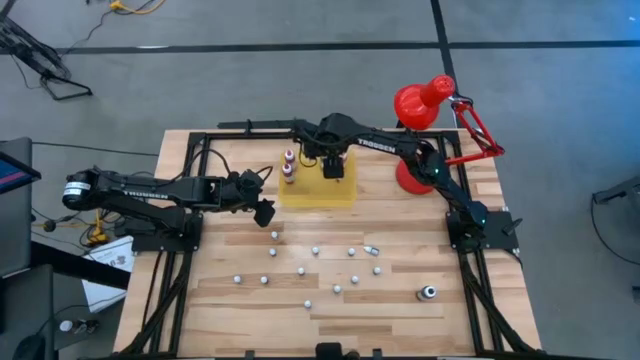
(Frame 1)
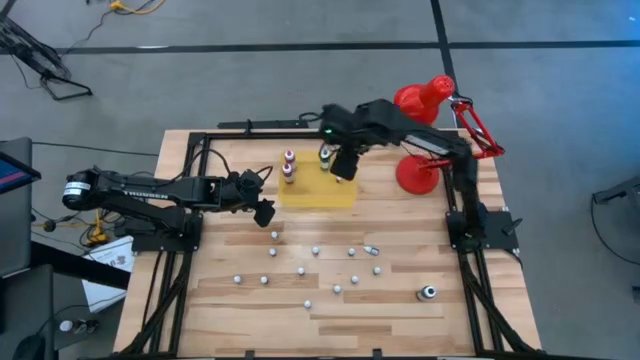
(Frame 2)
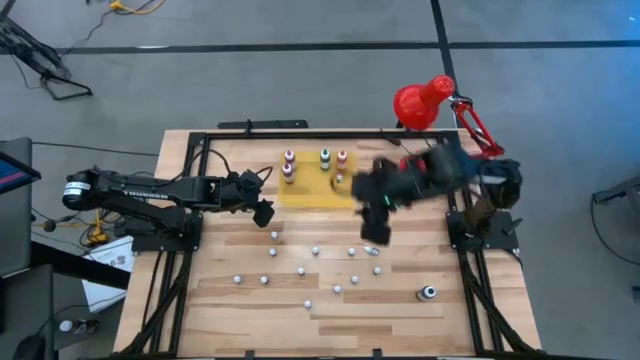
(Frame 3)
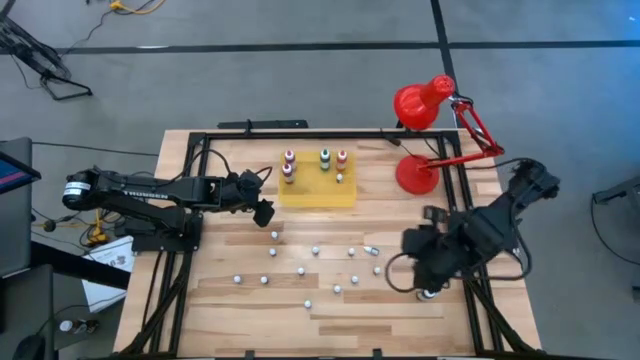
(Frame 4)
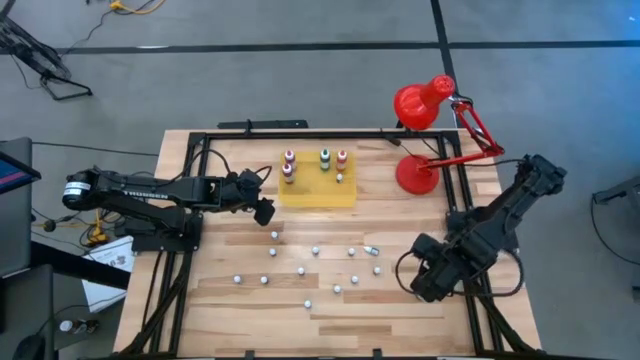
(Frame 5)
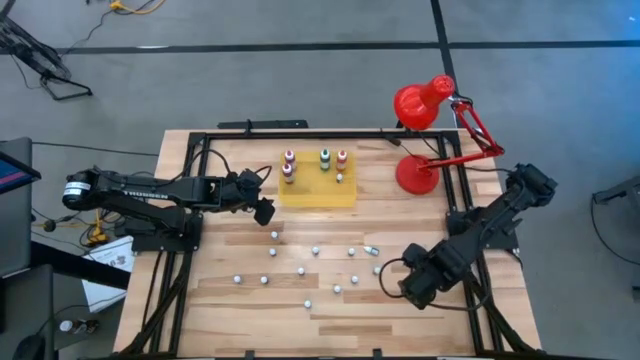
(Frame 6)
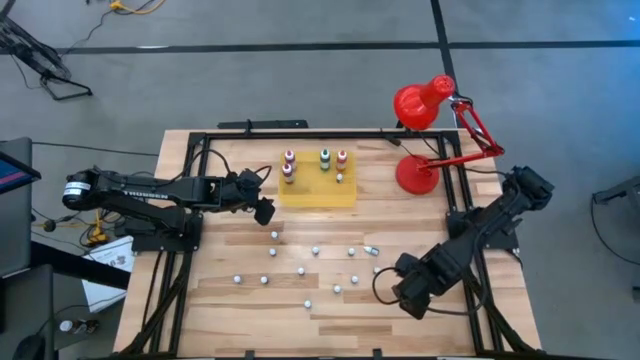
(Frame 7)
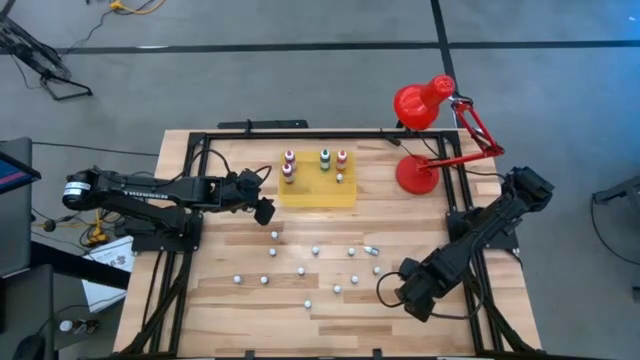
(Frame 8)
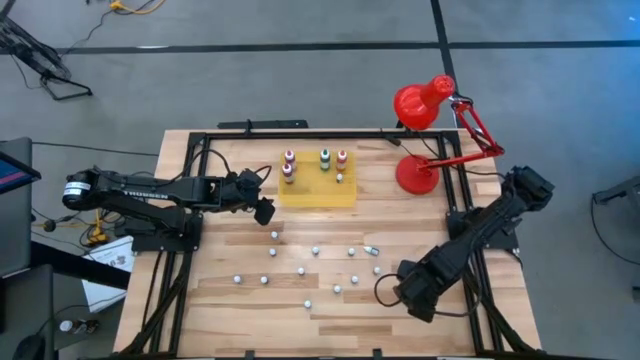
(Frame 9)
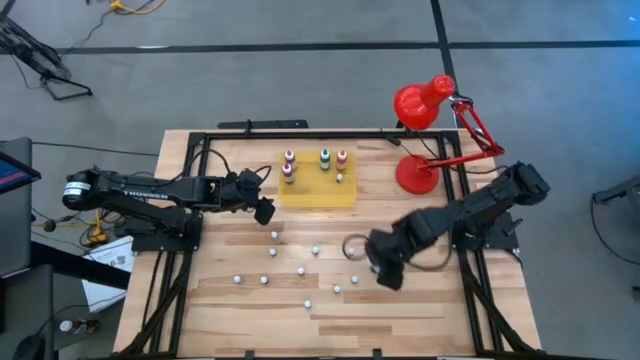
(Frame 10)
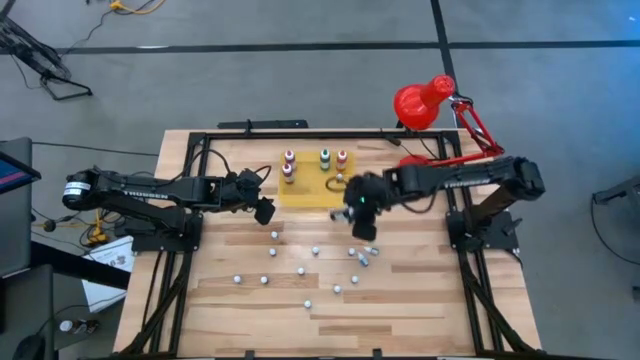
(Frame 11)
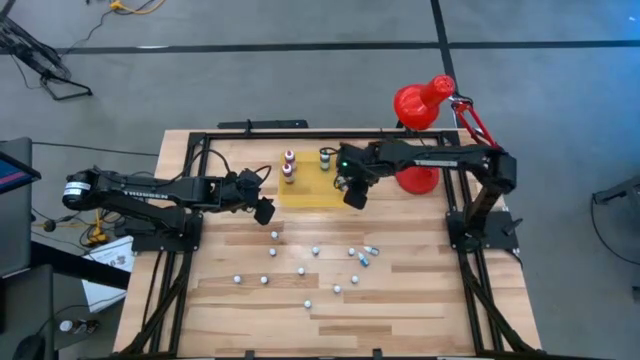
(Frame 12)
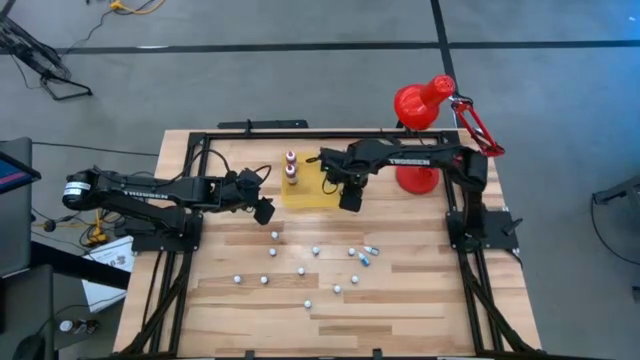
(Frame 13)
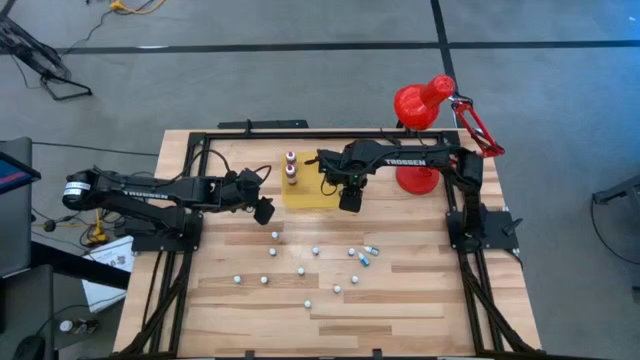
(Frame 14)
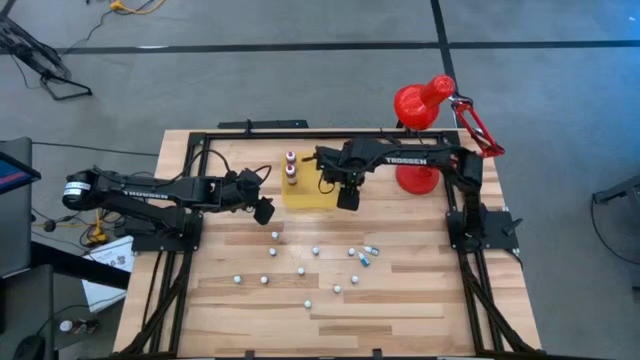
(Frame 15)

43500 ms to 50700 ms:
Task: Pick & Place food coloring
Put the large black food coloring in the bin

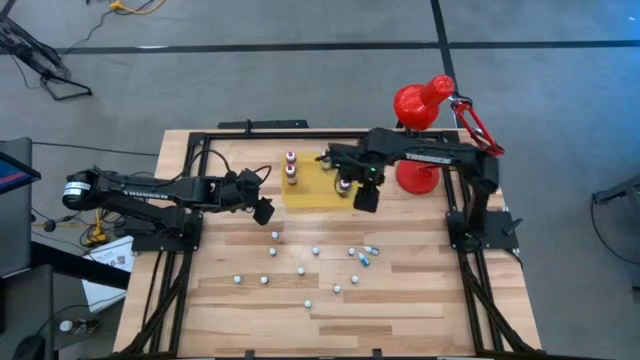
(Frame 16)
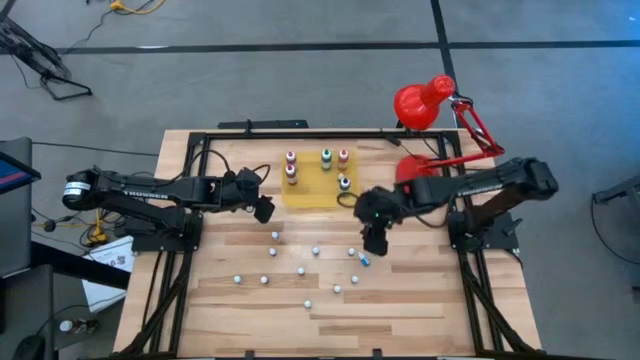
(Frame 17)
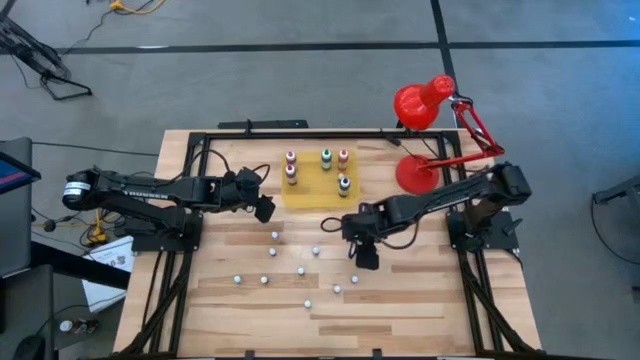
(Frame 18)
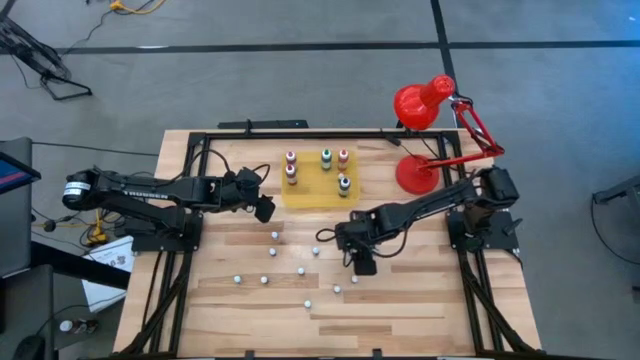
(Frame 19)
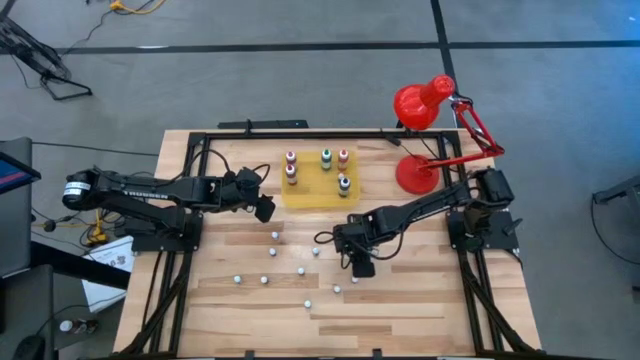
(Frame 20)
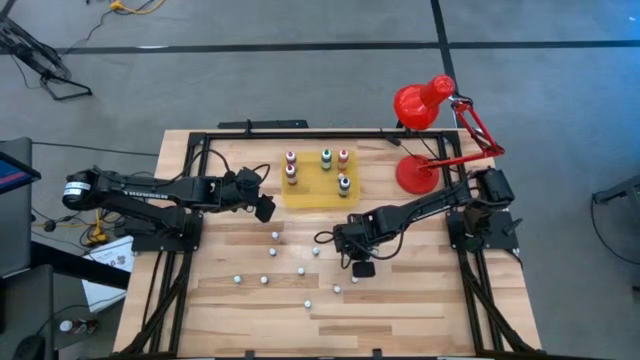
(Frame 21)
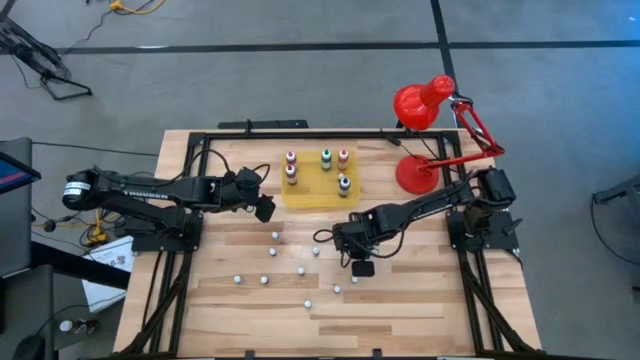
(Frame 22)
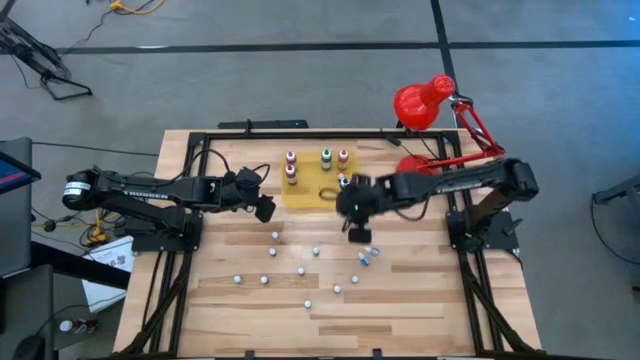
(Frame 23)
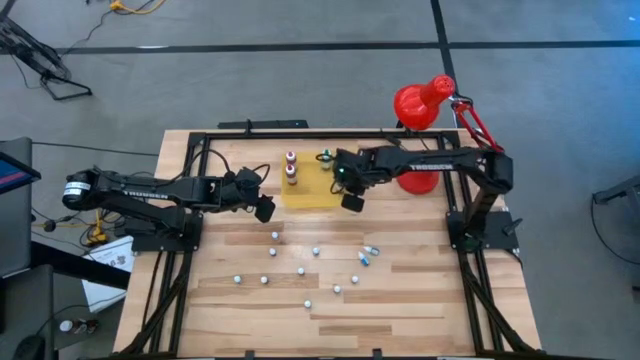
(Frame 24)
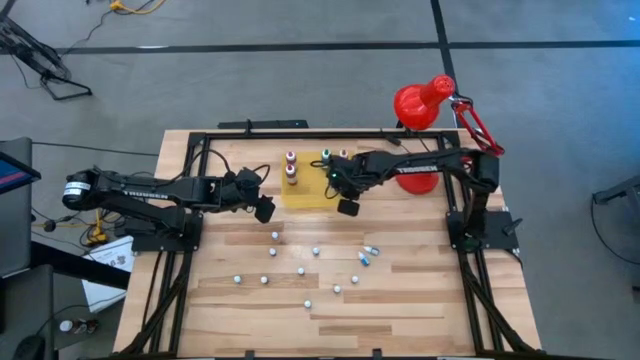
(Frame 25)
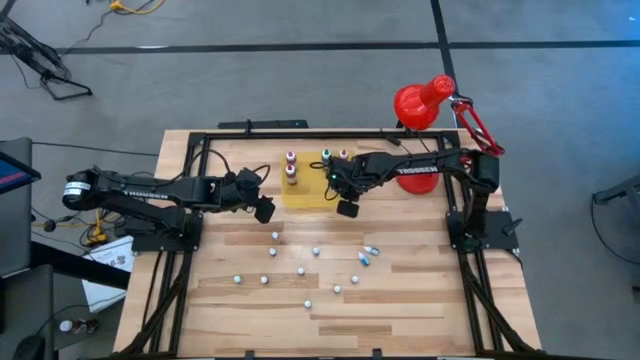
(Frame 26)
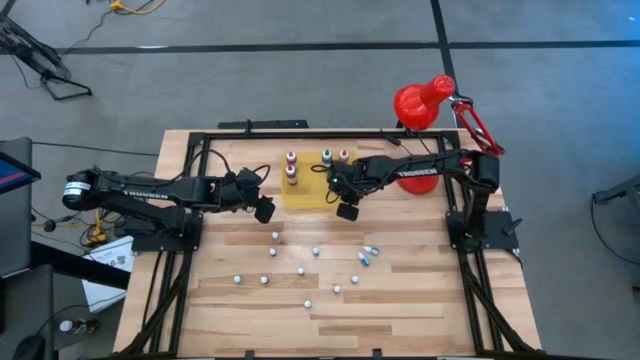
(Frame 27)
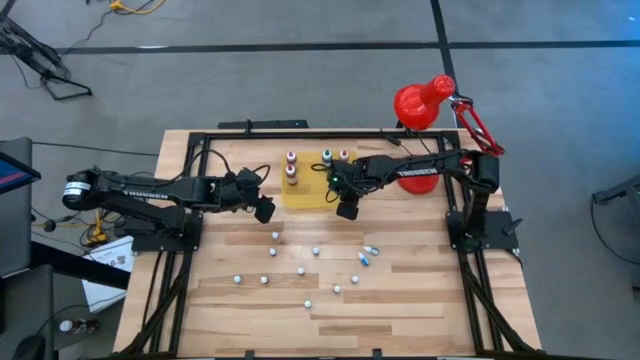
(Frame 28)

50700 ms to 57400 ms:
Put the small white food coloring in the bin

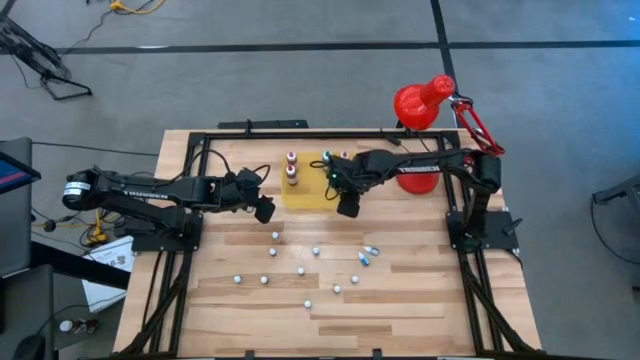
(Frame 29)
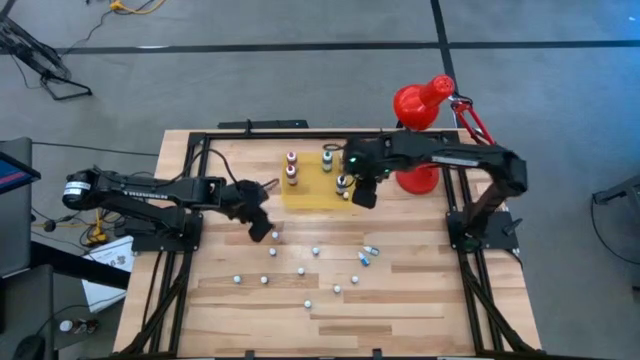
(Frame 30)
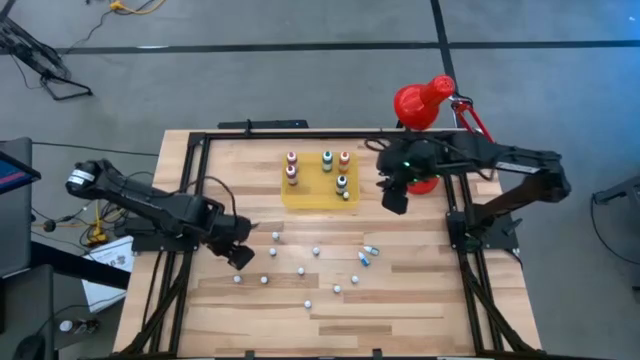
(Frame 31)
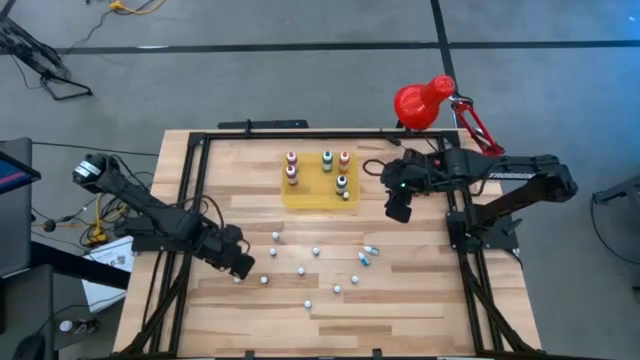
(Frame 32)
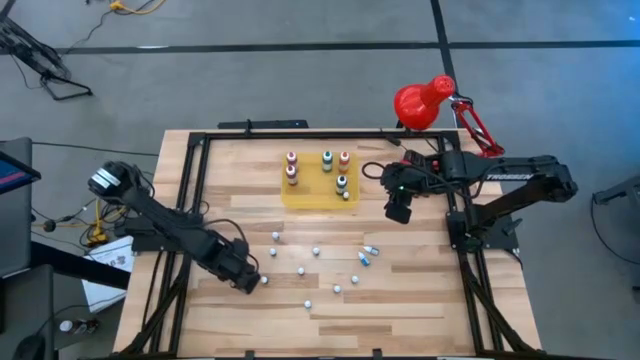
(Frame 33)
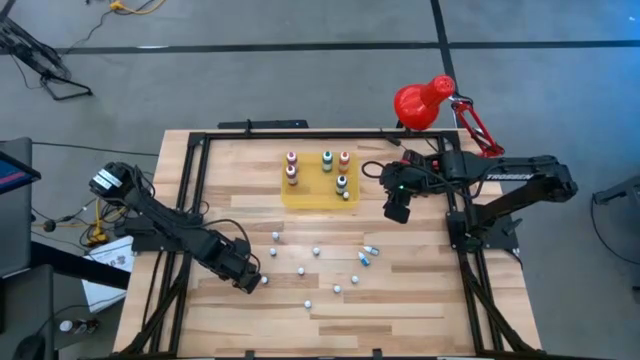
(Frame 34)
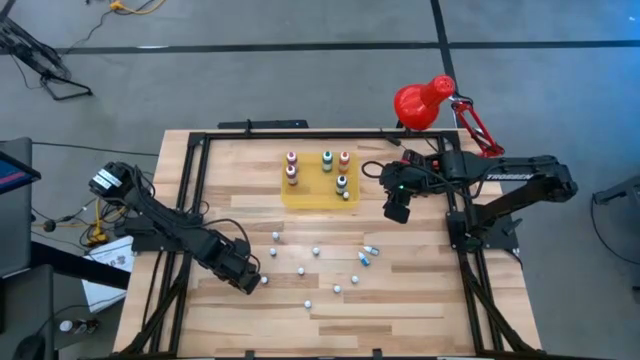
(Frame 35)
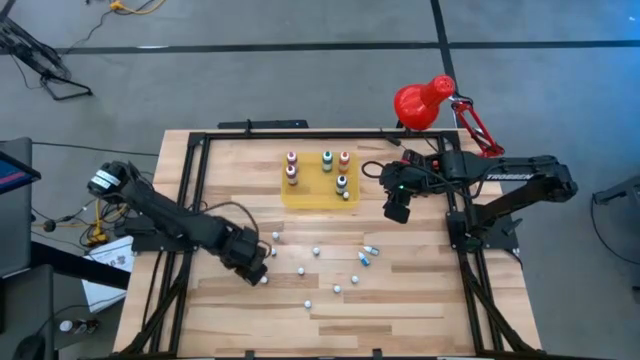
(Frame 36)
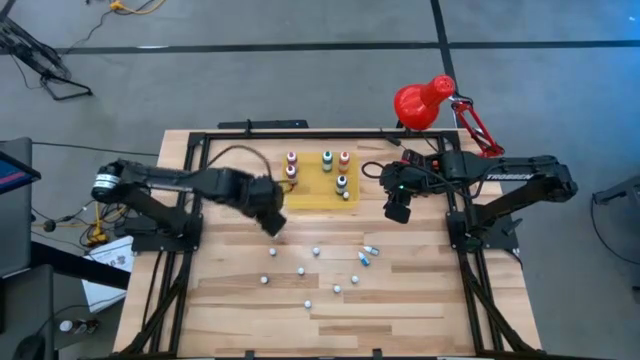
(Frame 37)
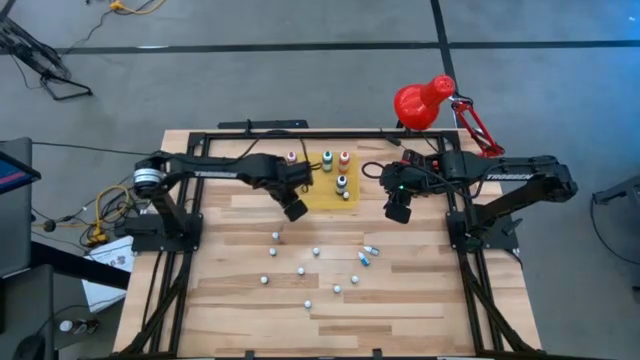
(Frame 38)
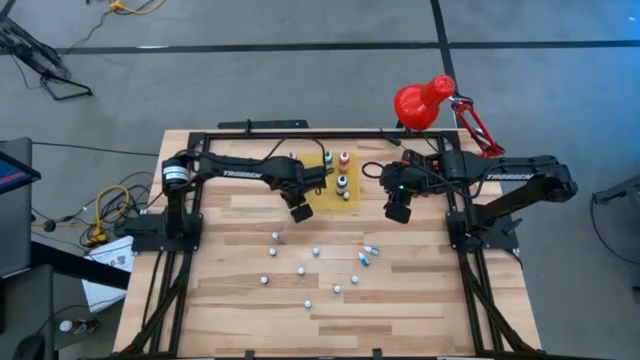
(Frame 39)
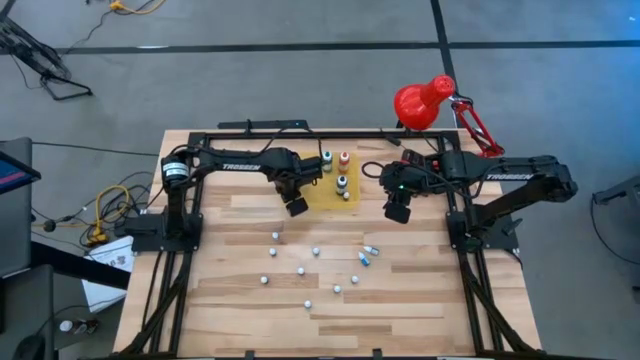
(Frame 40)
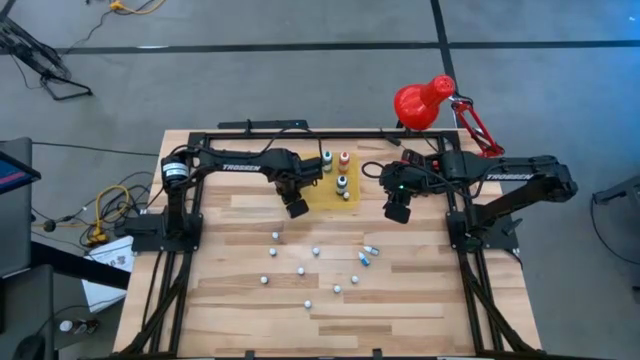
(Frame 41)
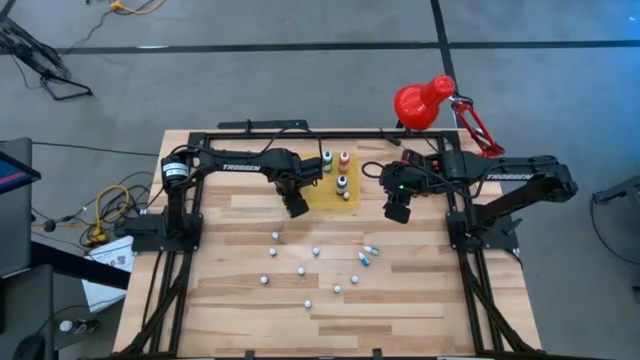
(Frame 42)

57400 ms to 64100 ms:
Put the small white food coloring in the bin
